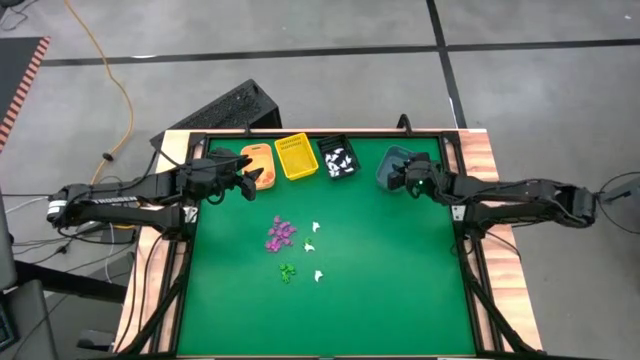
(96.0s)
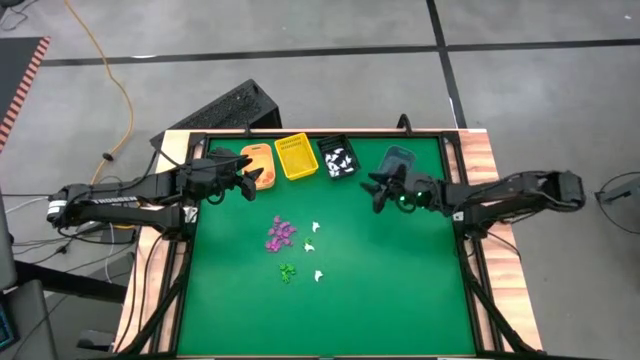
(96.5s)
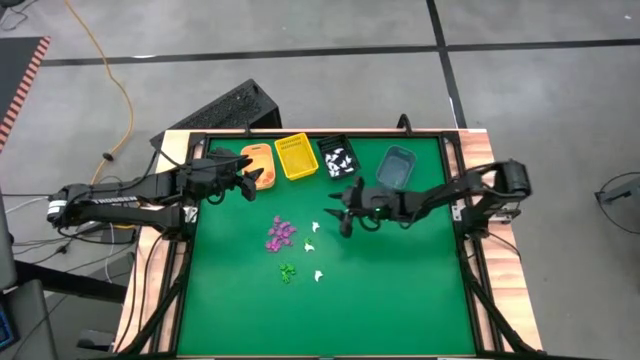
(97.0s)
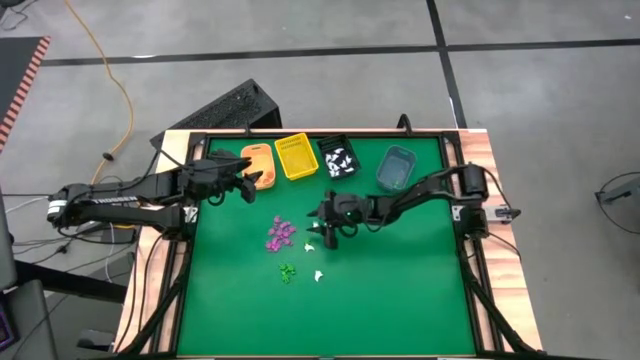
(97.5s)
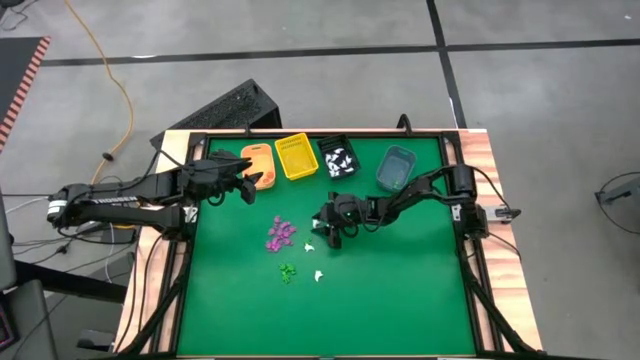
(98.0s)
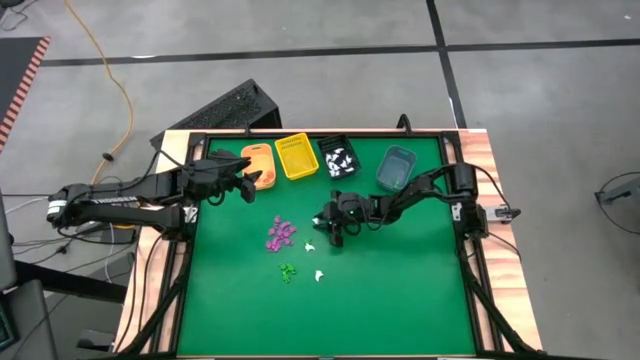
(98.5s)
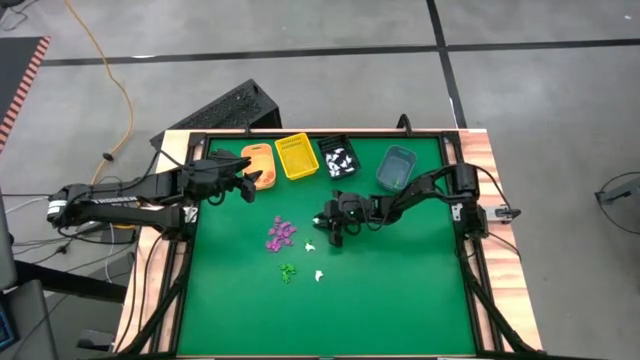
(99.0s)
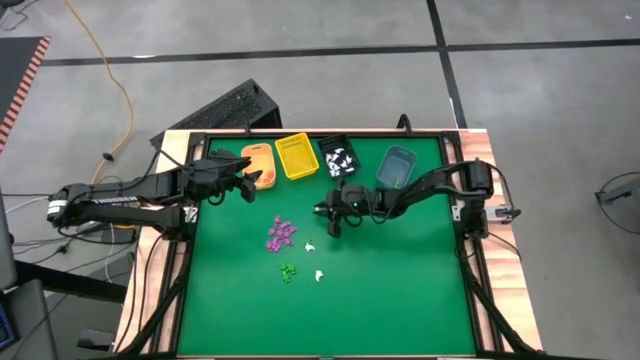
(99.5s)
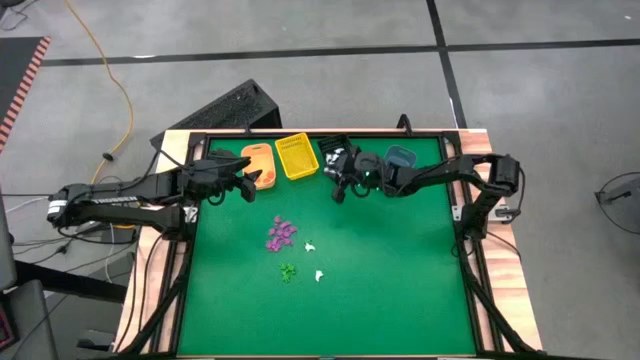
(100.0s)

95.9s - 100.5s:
Task: Sort Halloween decoration
Put the white ghost toy into the black bin

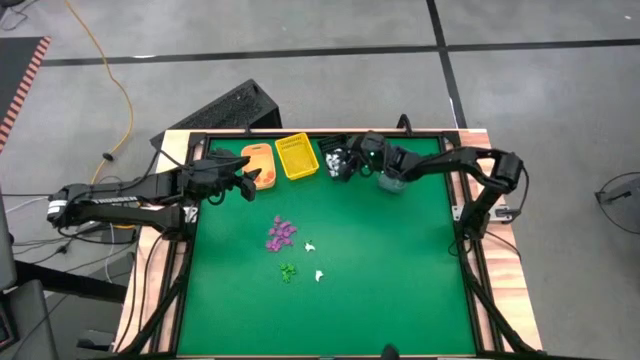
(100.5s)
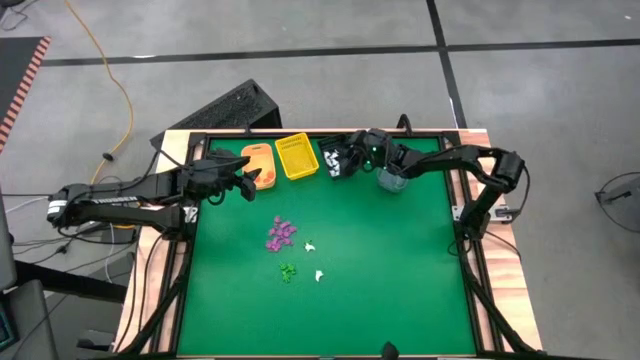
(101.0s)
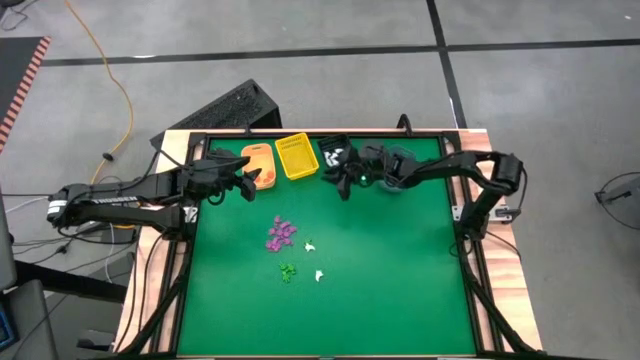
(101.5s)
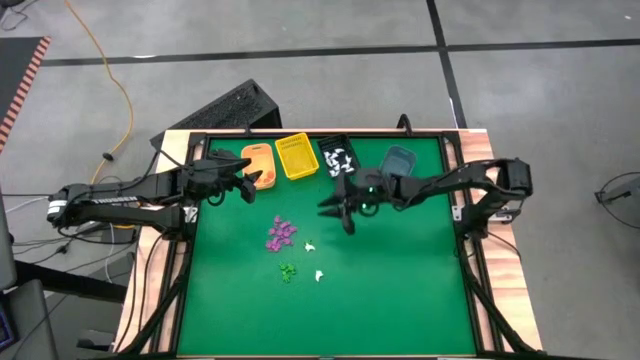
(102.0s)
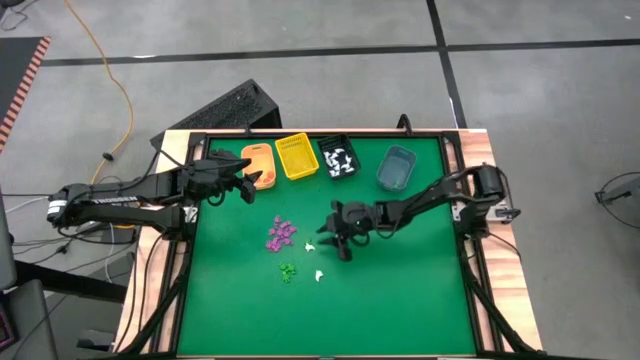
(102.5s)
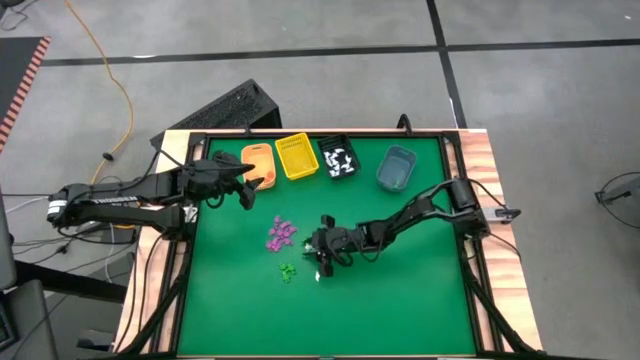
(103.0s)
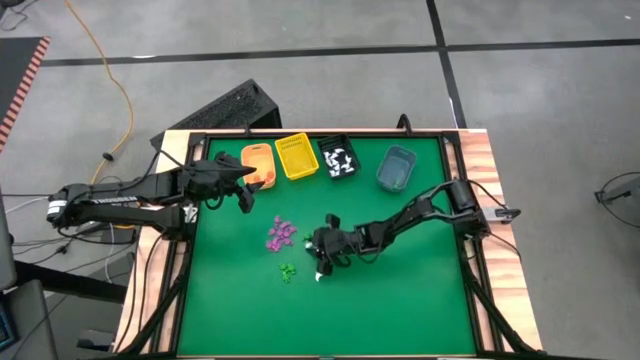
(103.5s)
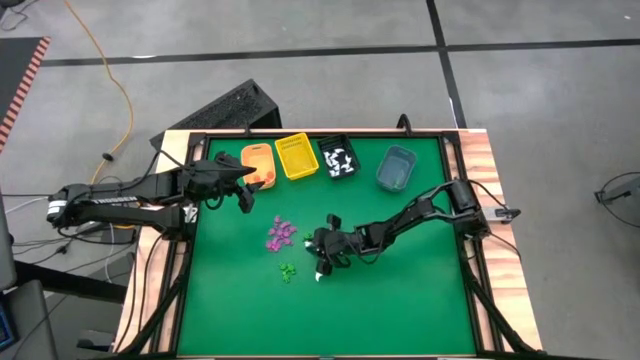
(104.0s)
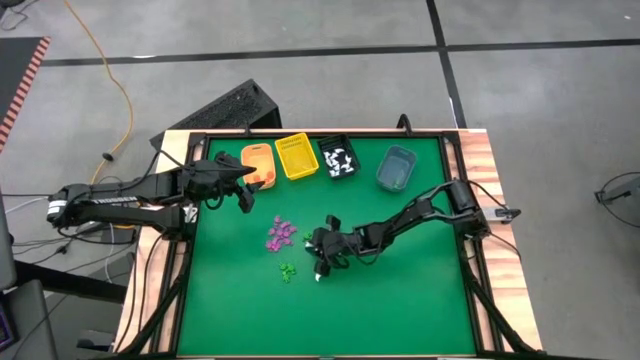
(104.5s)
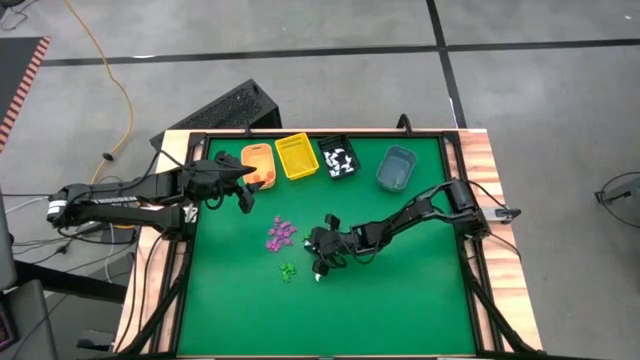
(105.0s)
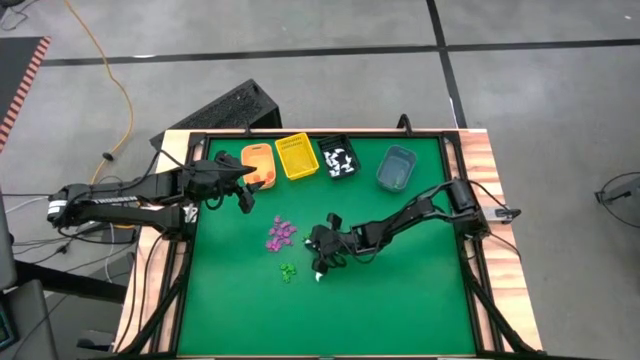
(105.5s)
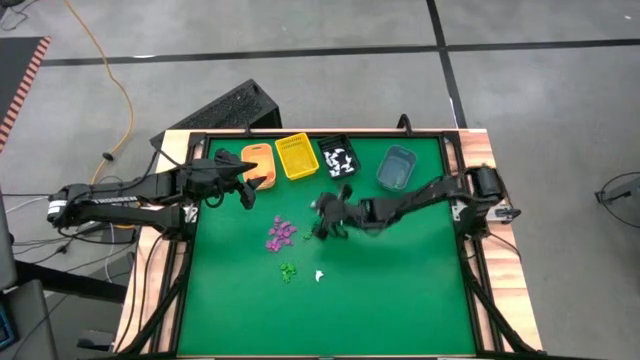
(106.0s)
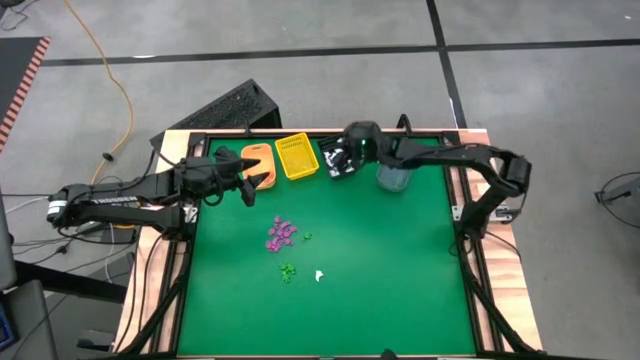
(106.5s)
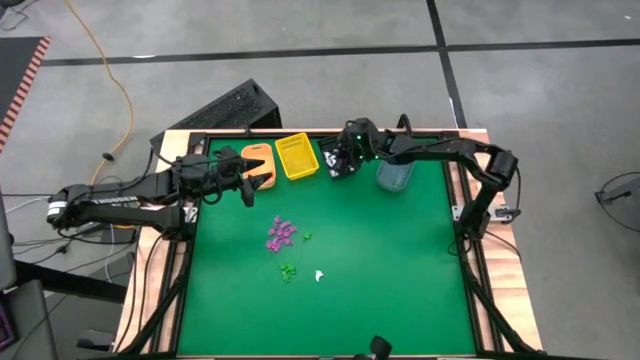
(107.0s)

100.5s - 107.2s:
Put the white ghost toy into the black bin

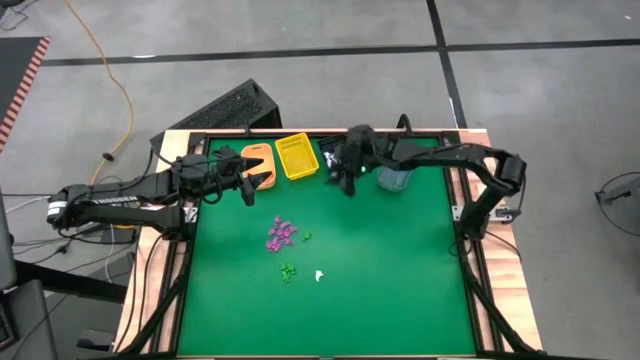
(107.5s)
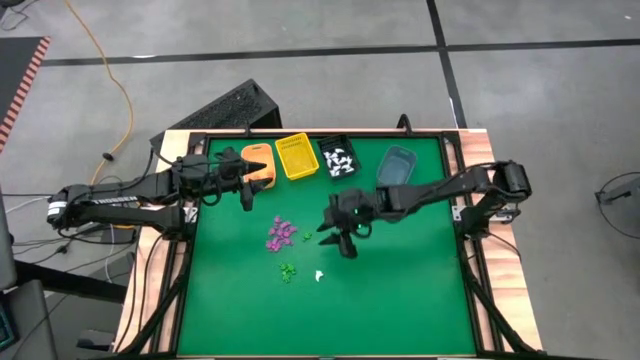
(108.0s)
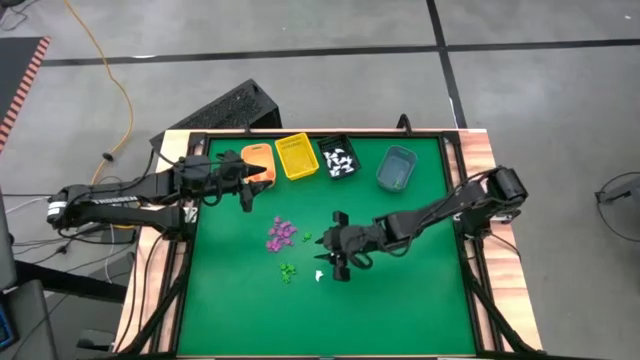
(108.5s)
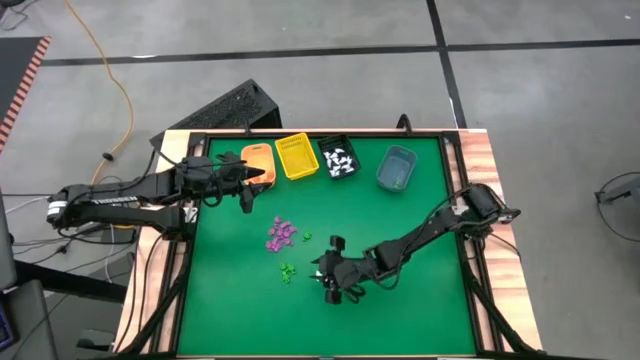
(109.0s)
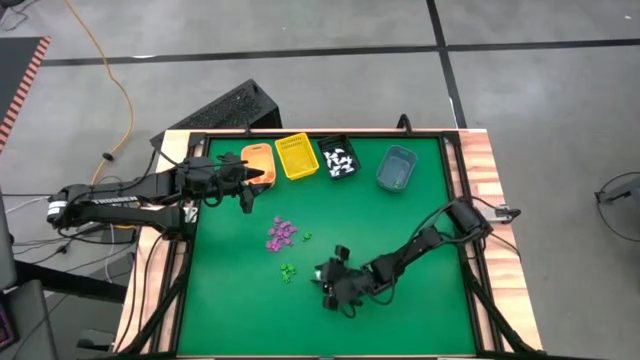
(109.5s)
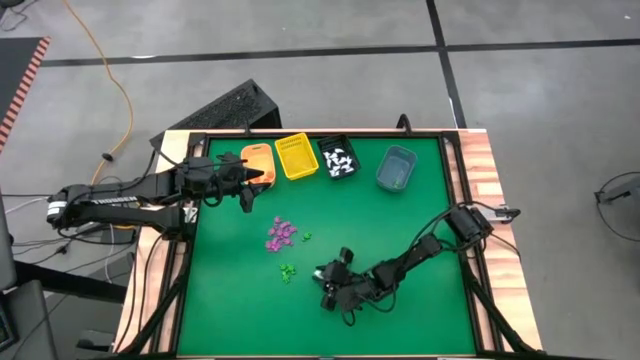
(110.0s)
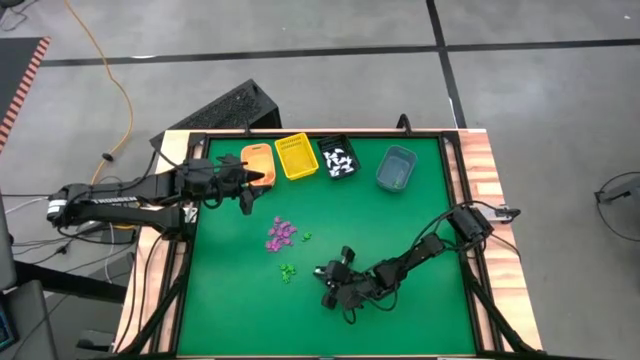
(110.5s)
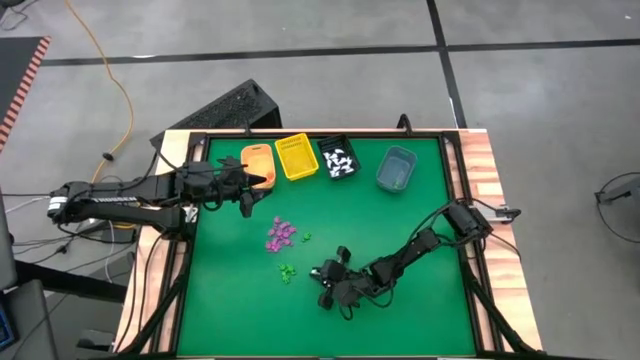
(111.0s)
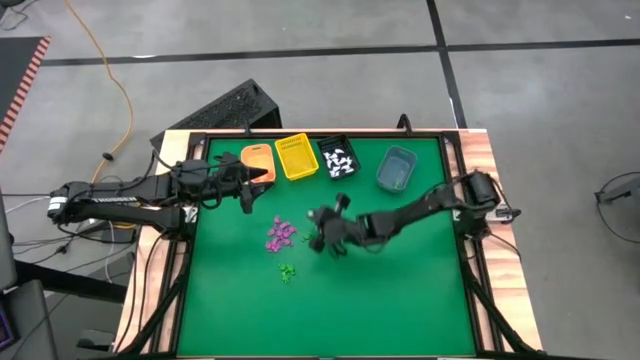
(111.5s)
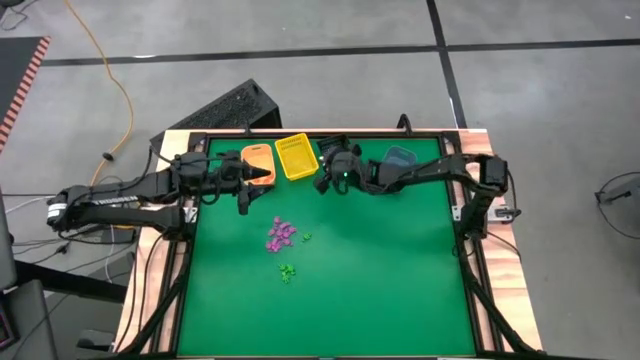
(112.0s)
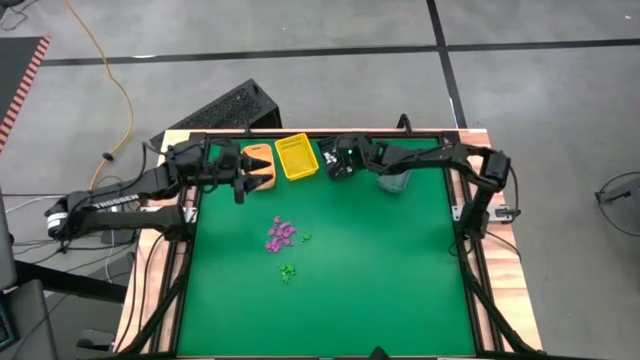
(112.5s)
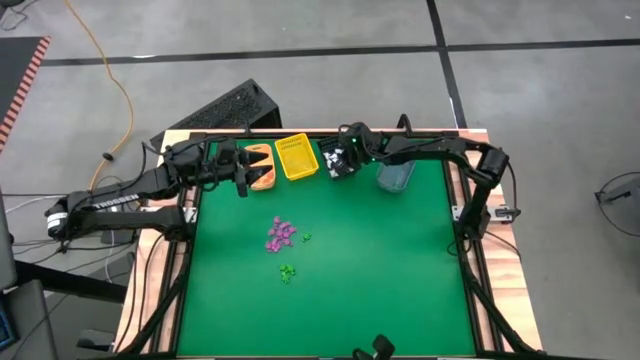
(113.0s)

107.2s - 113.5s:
Put the white ghost toy into the black bin

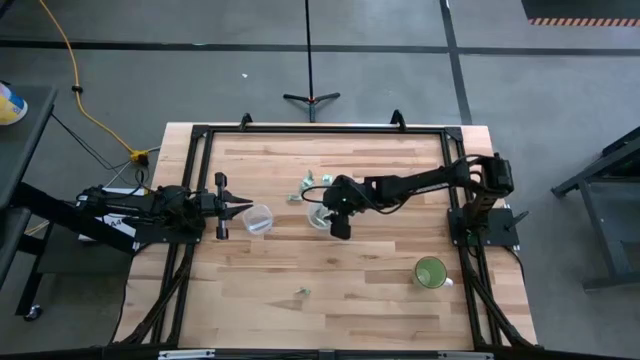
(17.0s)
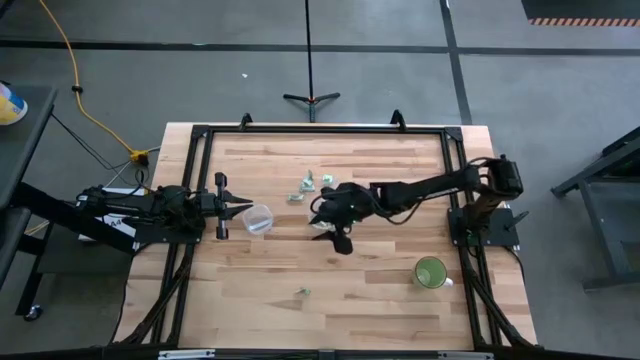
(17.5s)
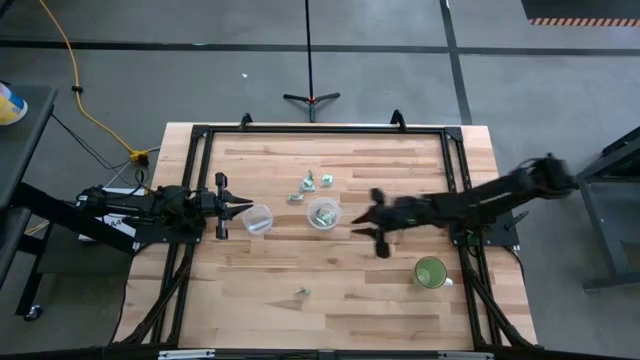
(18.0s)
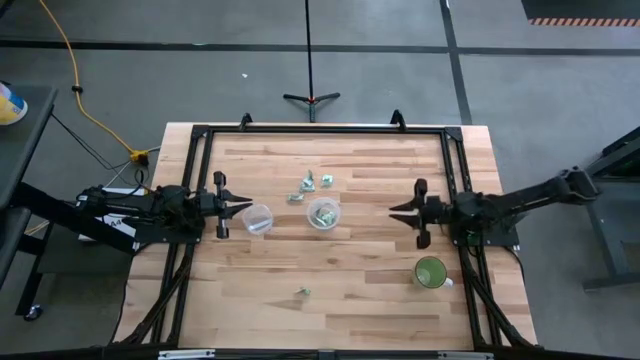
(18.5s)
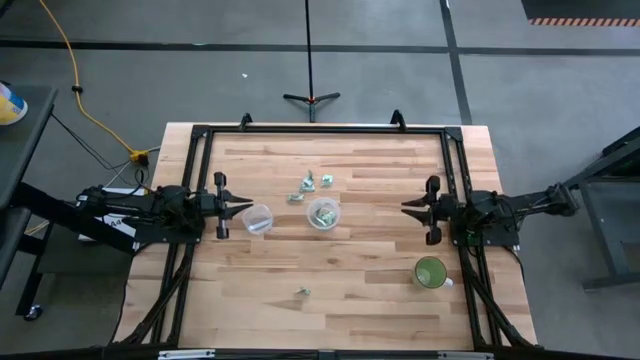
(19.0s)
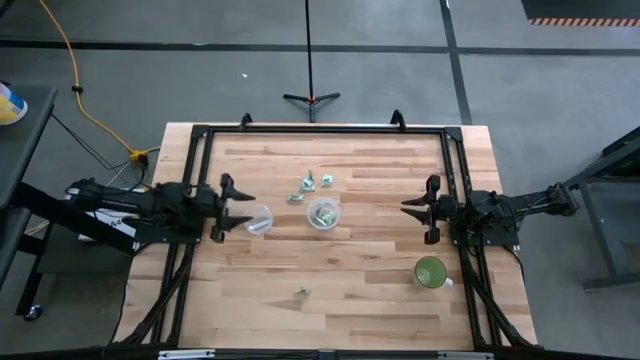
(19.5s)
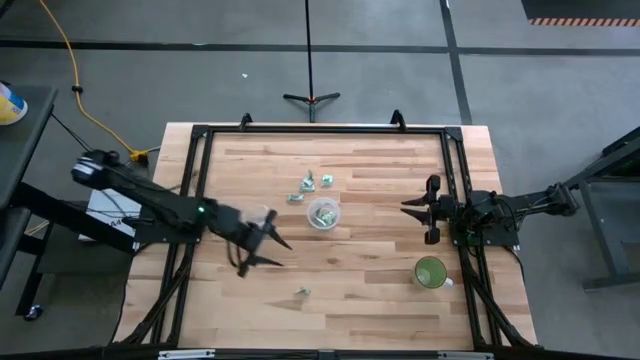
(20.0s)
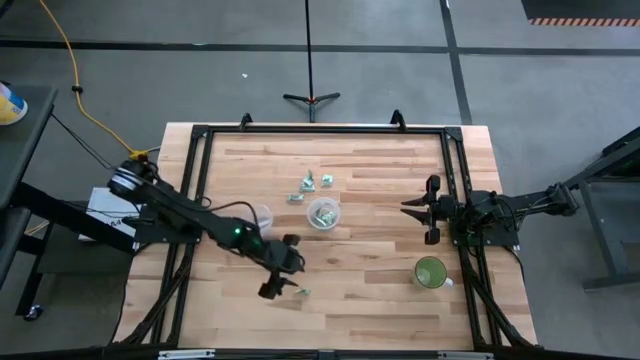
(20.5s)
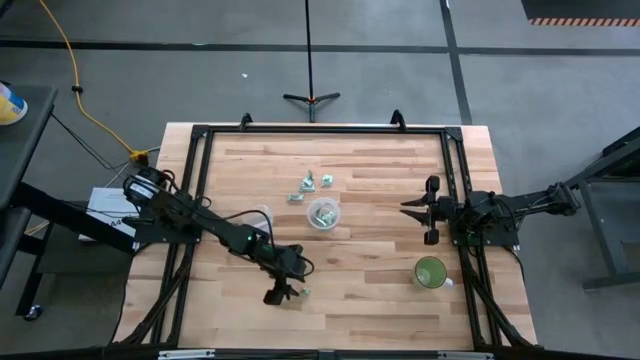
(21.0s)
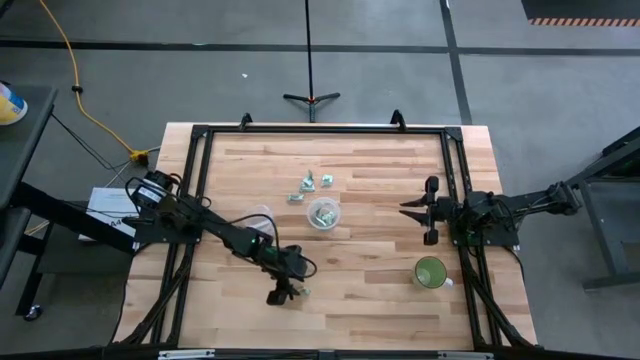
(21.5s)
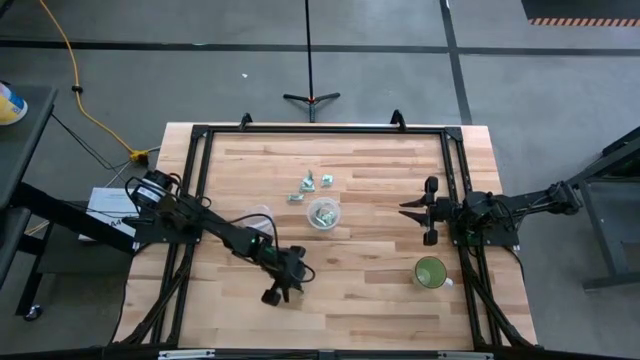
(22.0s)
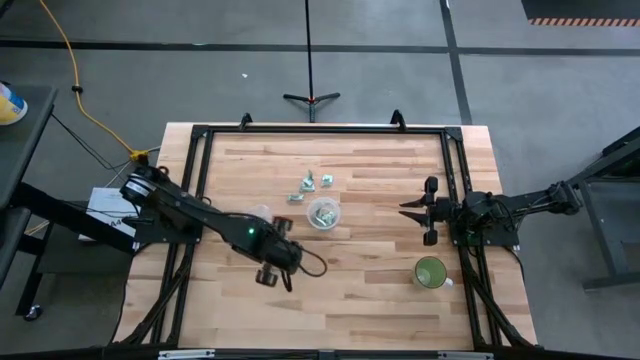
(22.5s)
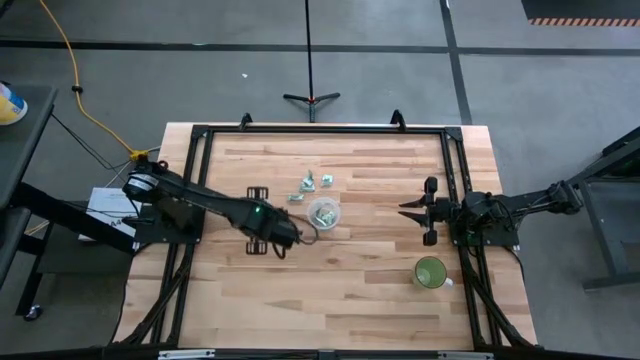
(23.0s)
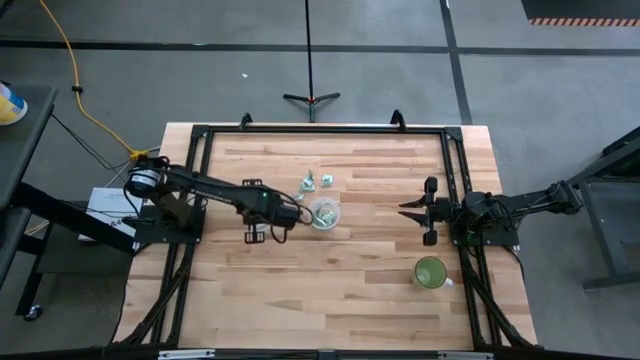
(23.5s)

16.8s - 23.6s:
Task: Pick and place Stevia / Truvia into bins
Put the white stevia packet into the left transparent container
